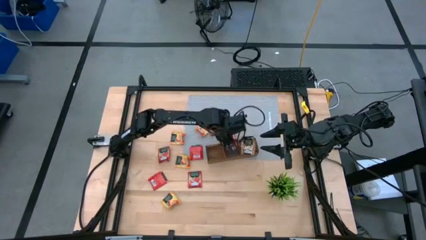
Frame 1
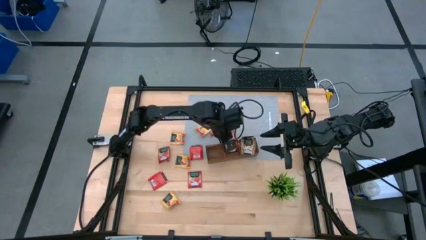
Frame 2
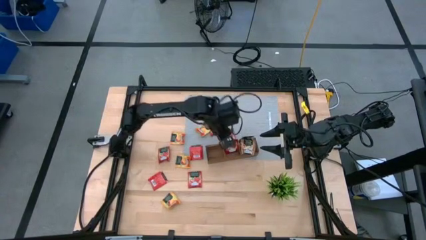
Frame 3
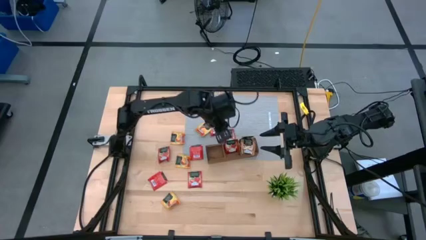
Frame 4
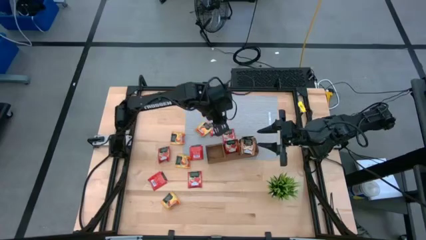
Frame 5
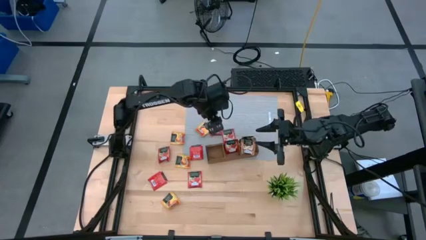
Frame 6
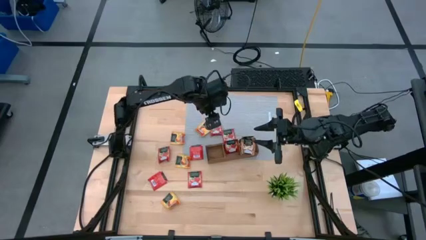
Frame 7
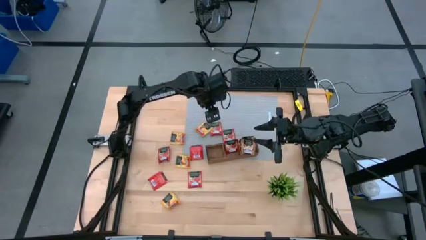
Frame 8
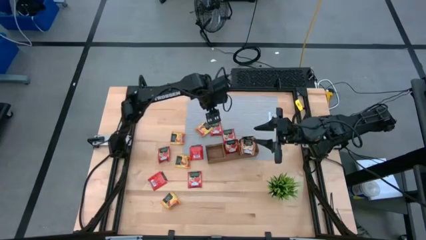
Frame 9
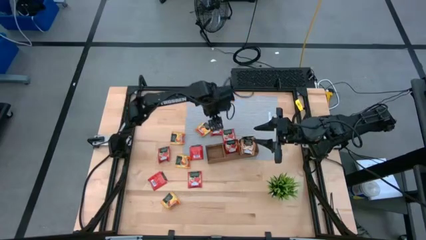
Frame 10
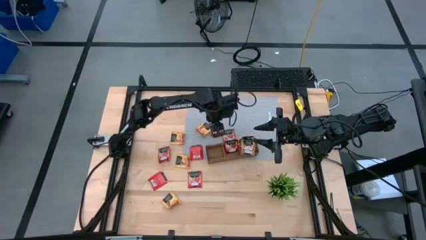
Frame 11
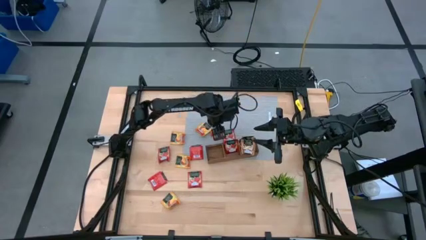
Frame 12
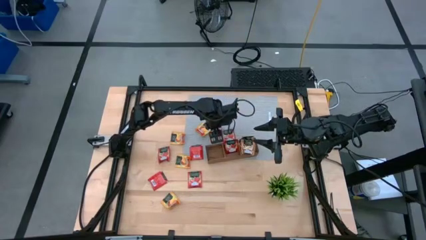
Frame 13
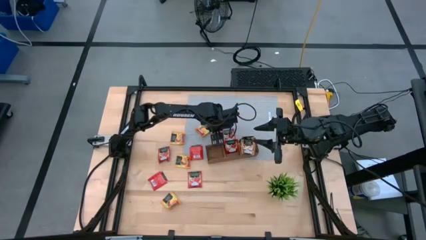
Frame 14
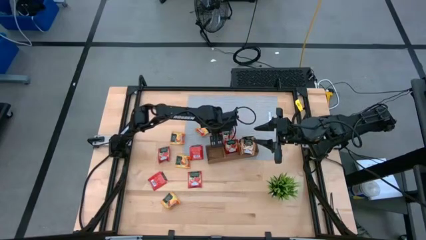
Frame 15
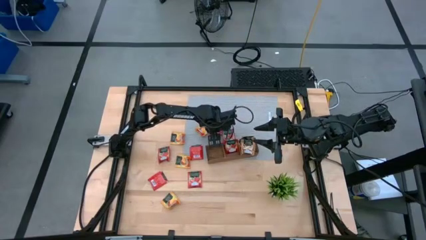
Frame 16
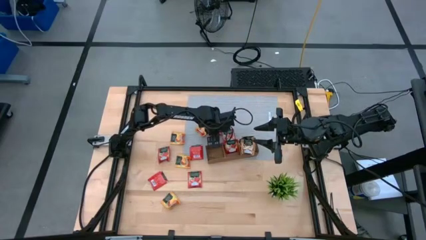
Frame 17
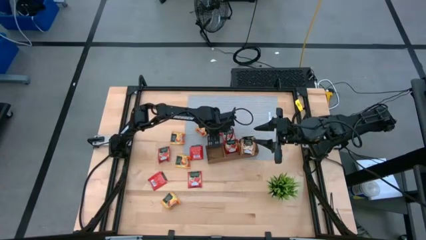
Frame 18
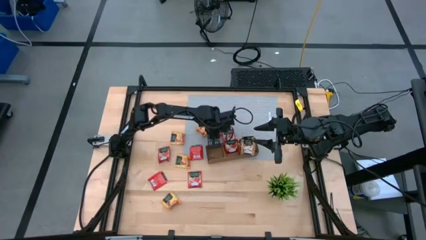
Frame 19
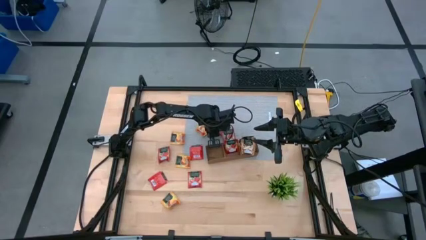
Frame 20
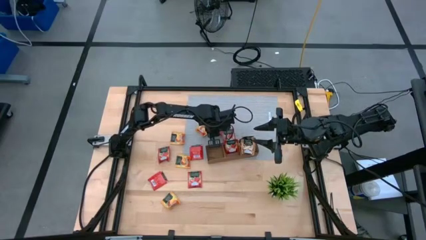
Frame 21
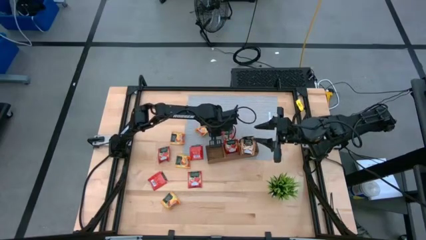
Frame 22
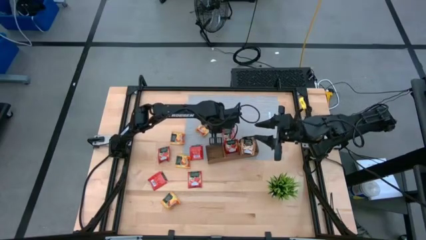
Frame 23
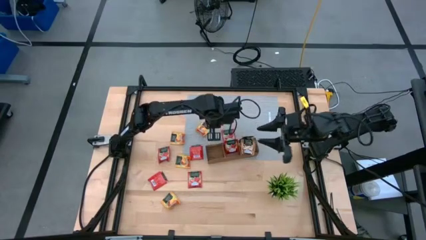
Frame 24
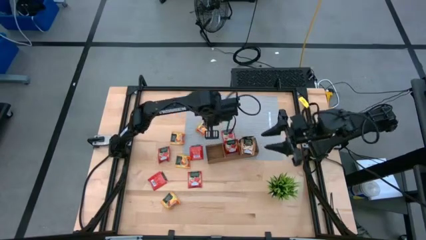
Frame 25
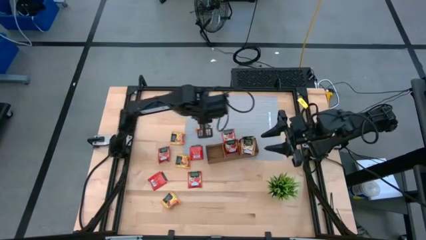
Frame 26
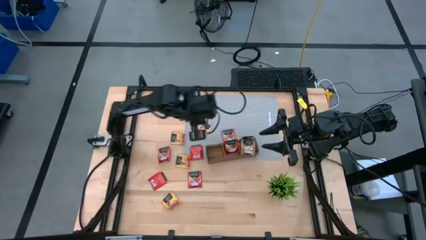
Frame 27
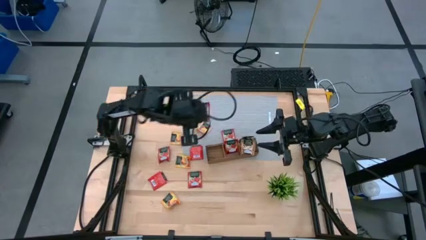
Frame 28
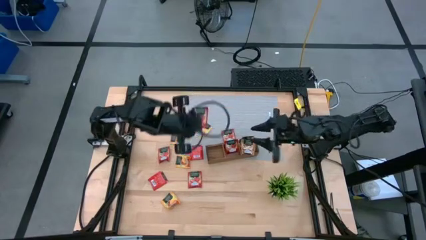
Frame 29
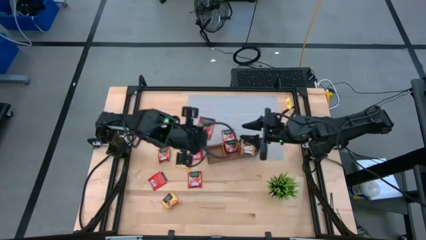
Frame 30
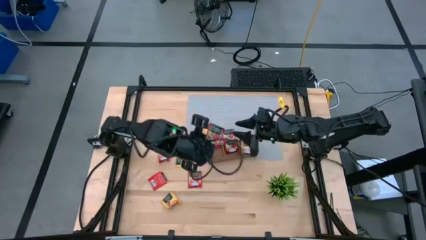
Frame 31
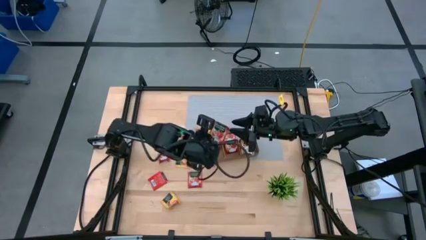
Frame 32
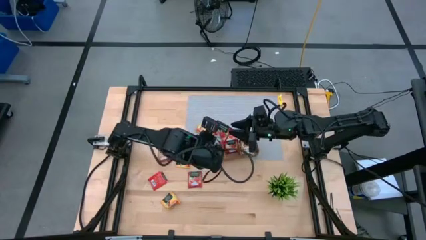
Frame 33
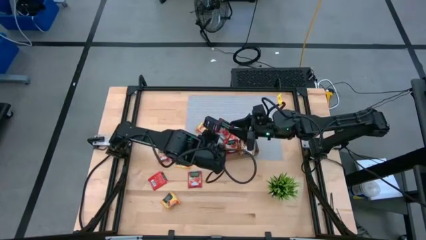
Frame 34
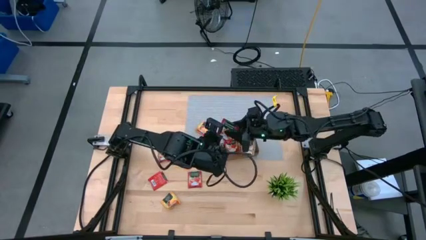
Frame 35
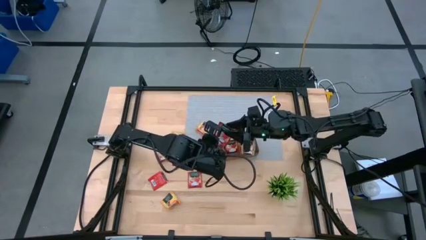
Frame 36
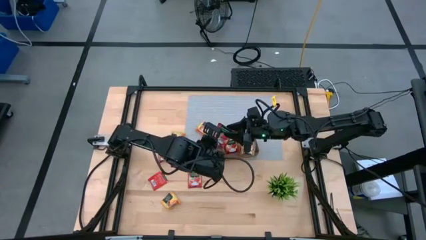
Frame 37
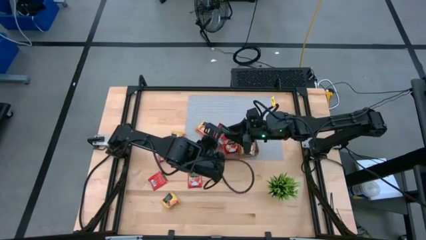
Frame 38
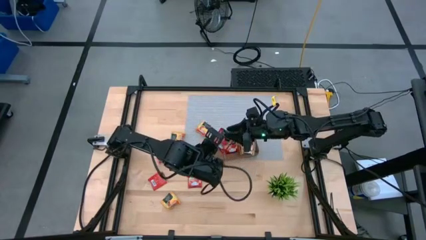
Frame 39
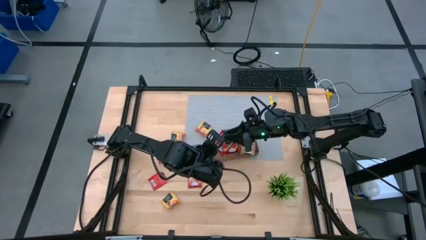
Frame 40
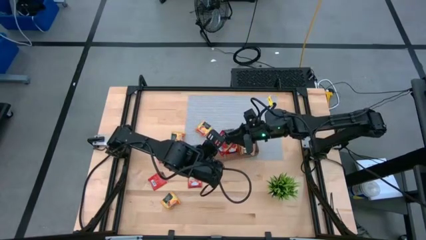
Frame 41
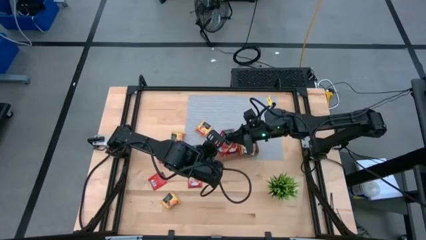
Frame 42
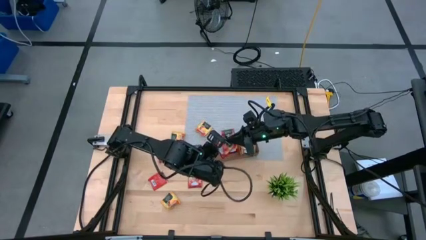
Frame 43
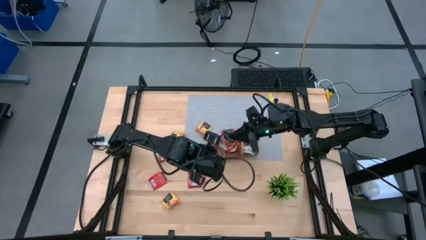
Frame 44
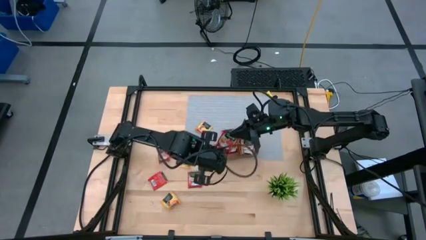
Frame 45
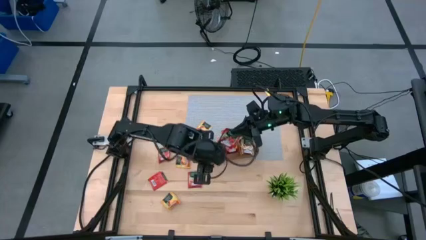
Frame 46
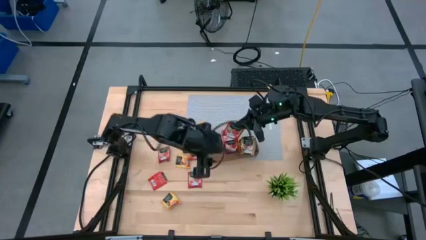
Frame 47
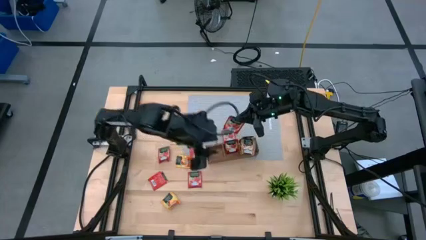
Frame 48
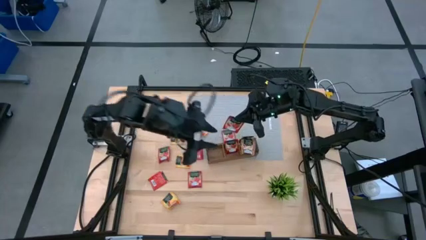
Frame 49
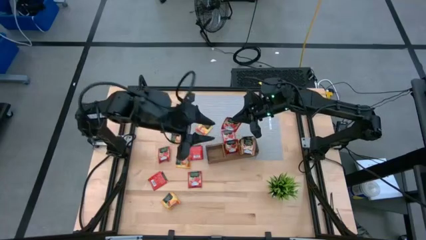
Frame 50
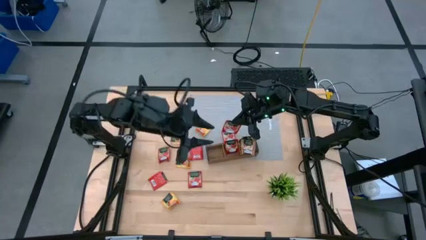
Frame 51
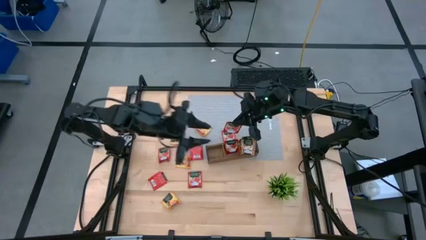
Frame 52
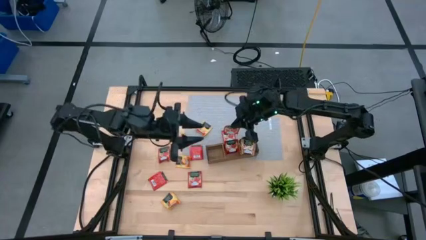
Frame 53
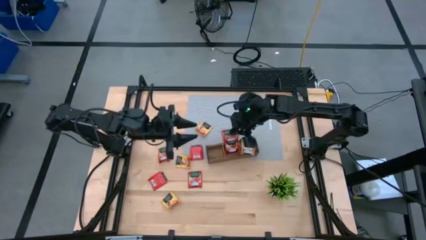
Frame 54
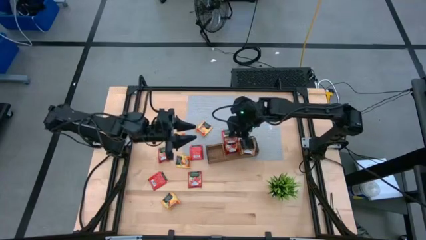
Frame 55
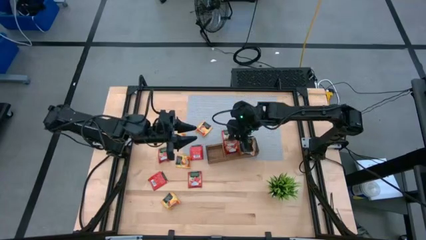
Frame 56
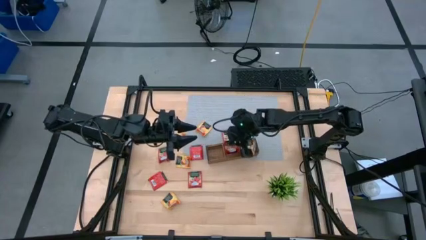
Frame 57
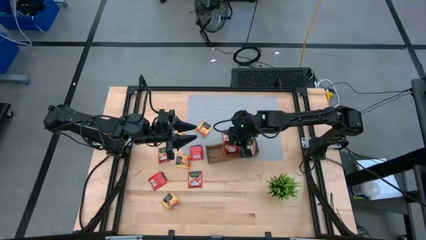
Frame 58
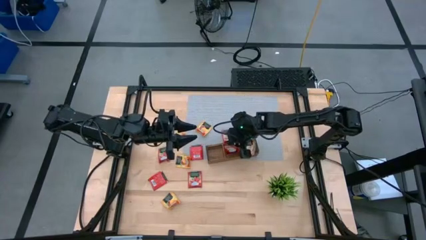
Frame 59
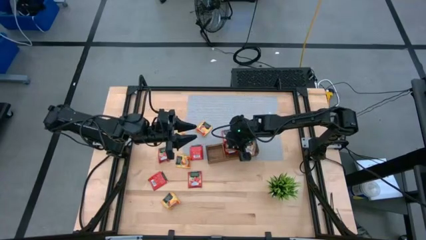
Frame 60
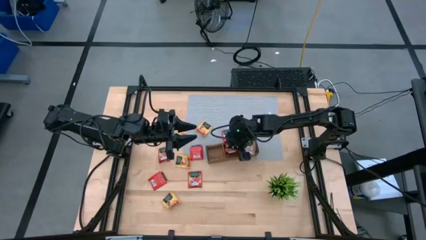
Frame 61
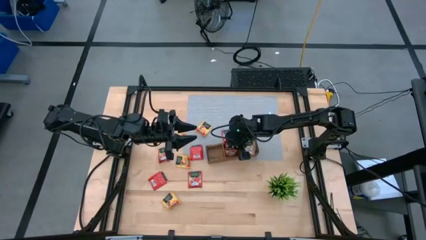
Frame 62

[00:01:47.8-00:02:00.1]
Task: Pick & Place Tea
Put the red tea bag into the middle section of the wooden organizer
